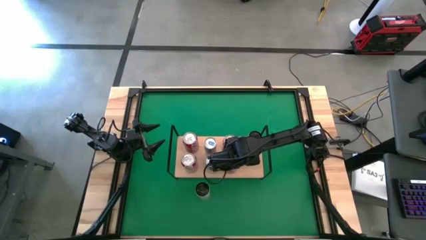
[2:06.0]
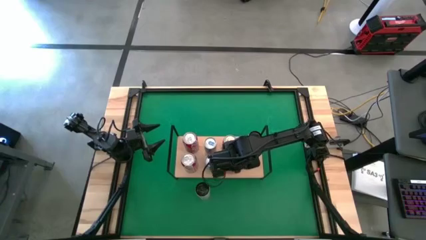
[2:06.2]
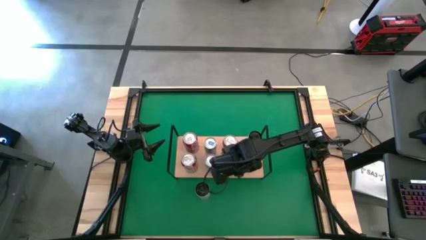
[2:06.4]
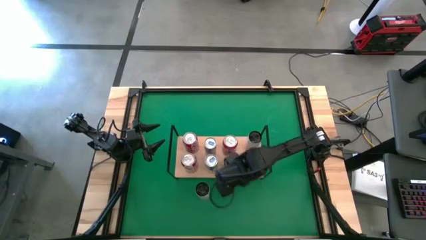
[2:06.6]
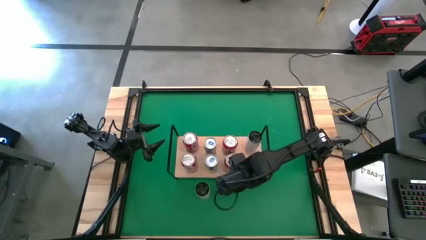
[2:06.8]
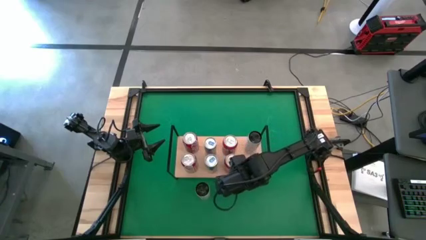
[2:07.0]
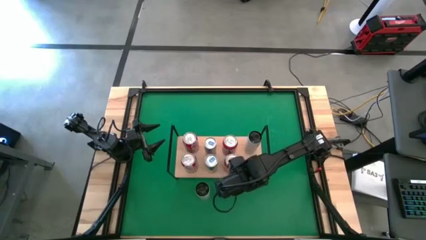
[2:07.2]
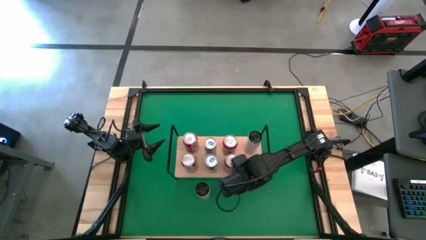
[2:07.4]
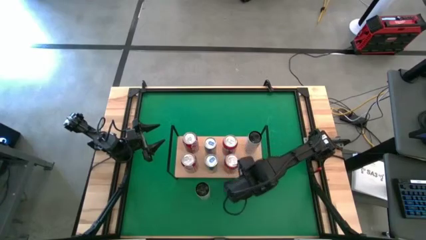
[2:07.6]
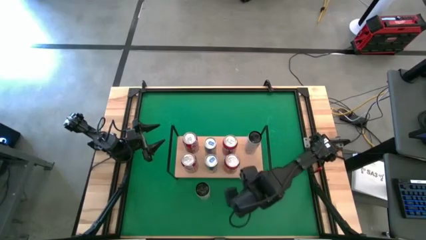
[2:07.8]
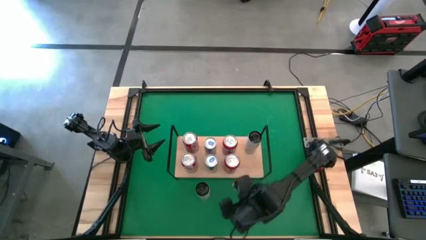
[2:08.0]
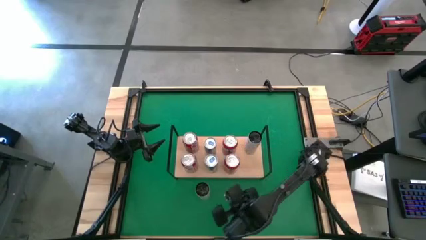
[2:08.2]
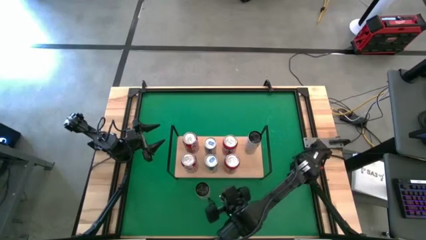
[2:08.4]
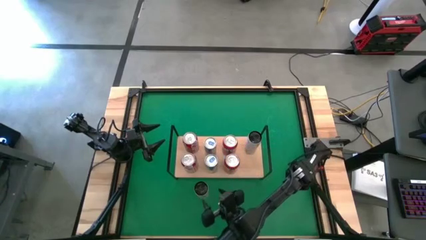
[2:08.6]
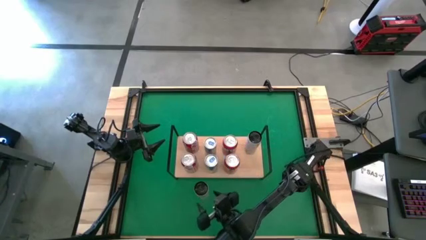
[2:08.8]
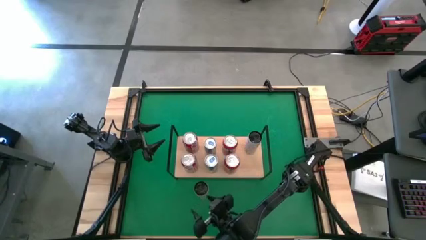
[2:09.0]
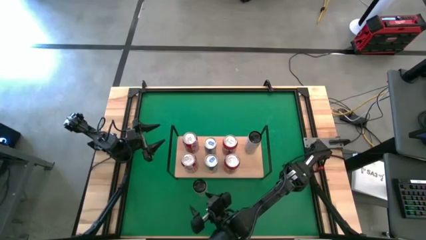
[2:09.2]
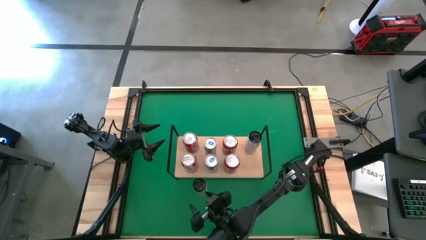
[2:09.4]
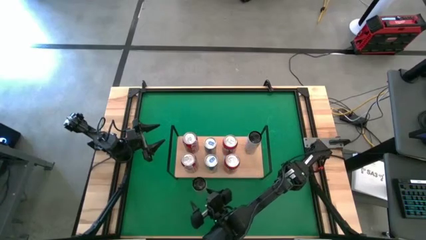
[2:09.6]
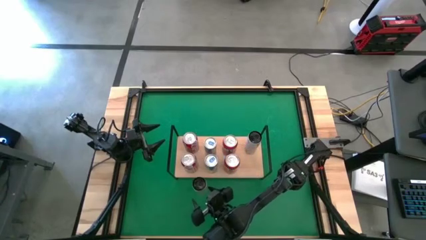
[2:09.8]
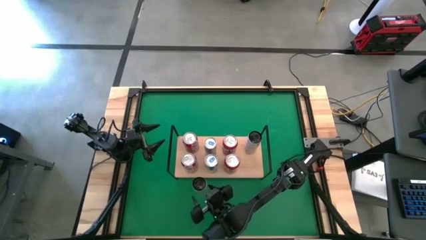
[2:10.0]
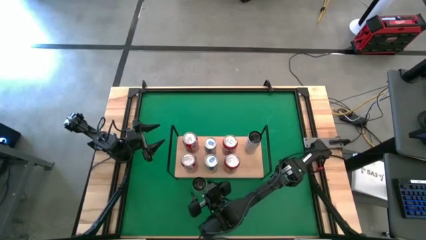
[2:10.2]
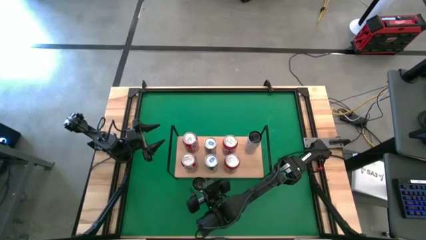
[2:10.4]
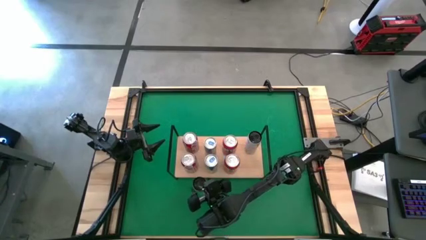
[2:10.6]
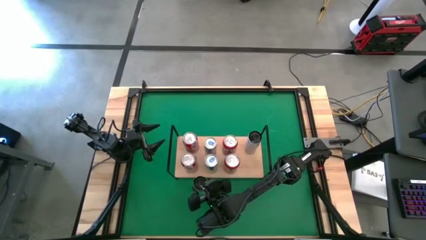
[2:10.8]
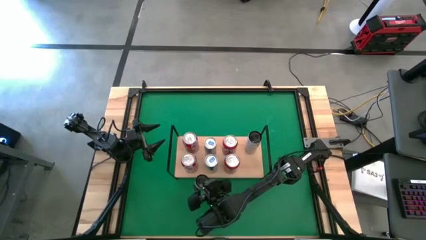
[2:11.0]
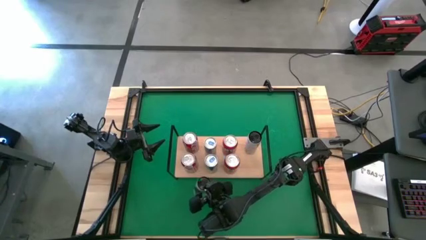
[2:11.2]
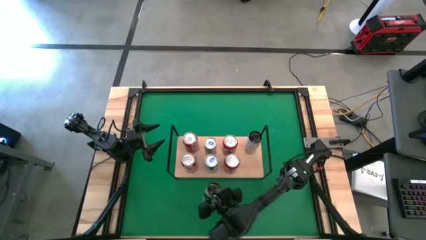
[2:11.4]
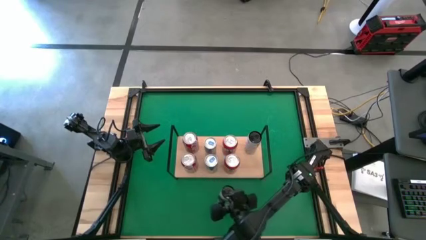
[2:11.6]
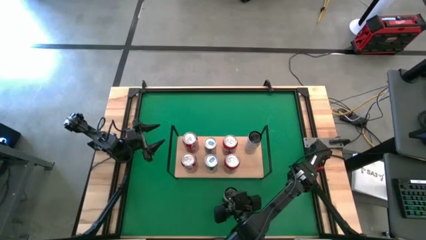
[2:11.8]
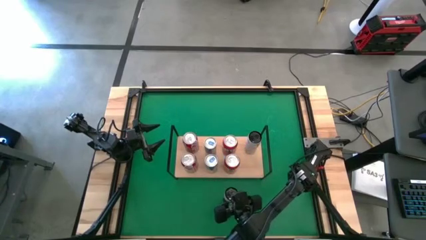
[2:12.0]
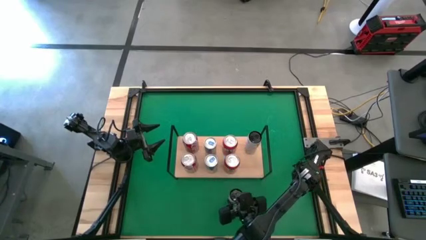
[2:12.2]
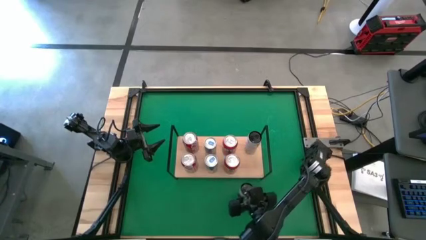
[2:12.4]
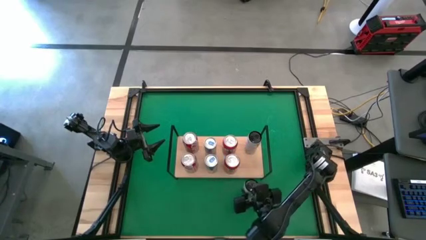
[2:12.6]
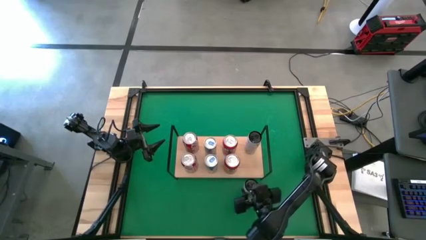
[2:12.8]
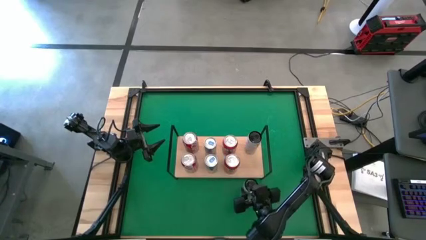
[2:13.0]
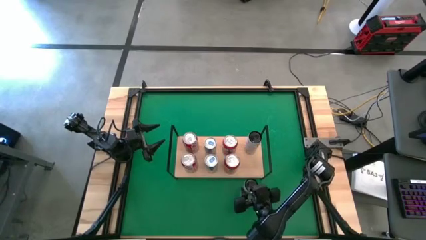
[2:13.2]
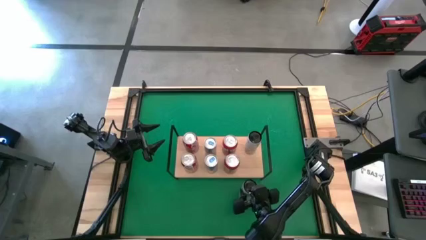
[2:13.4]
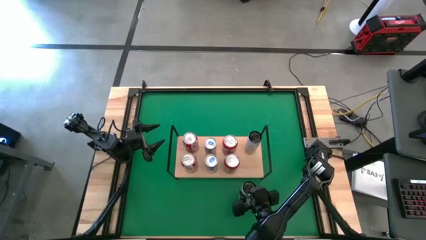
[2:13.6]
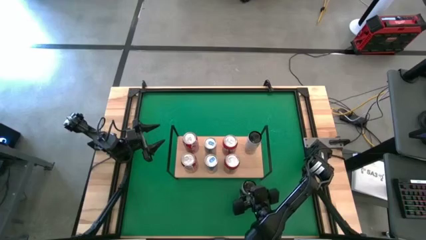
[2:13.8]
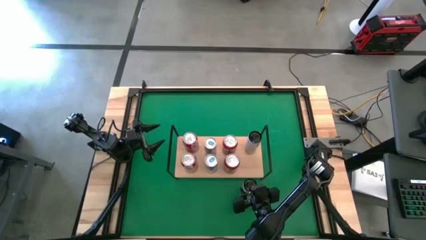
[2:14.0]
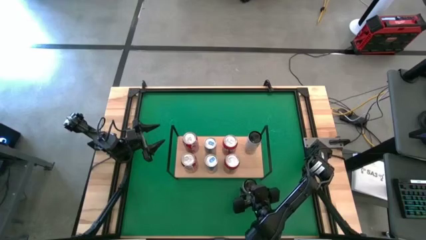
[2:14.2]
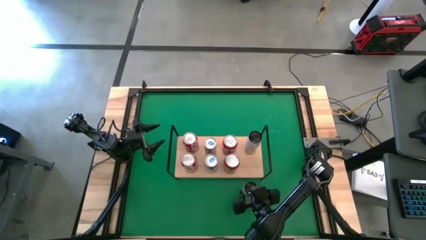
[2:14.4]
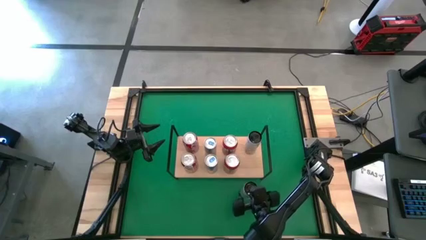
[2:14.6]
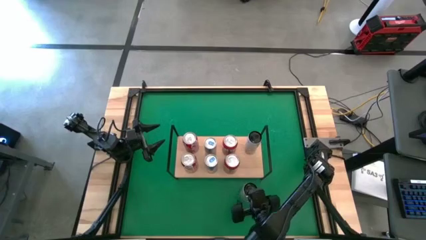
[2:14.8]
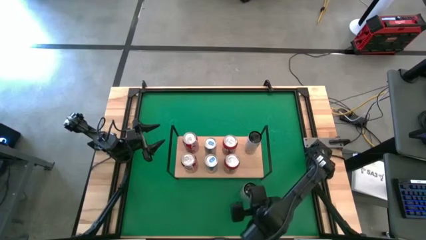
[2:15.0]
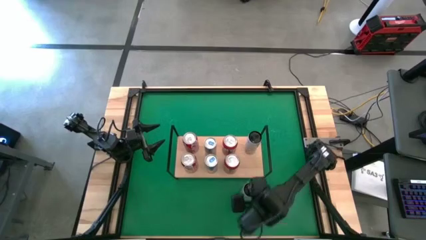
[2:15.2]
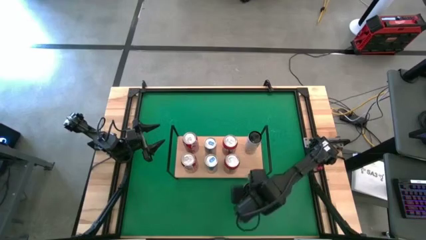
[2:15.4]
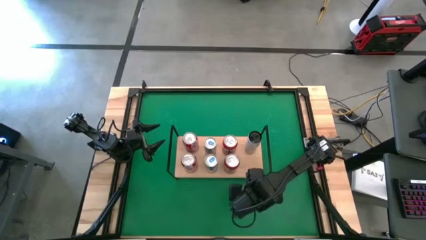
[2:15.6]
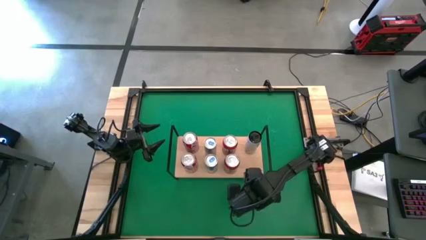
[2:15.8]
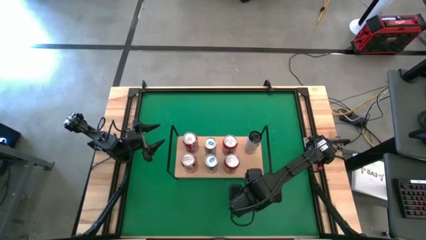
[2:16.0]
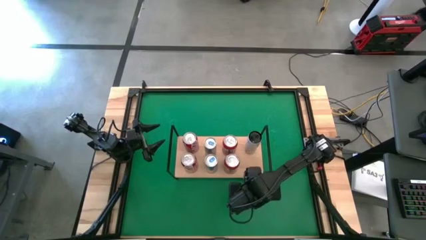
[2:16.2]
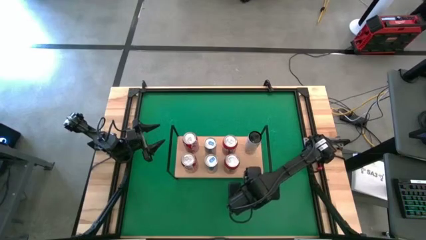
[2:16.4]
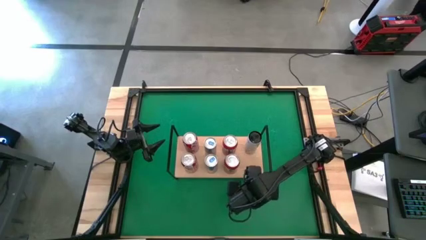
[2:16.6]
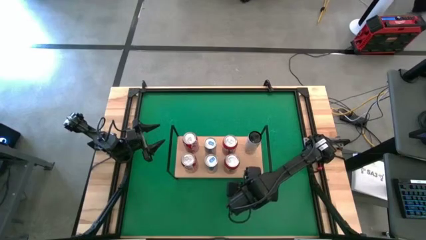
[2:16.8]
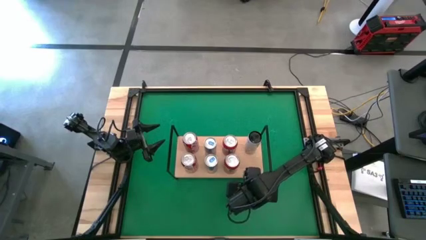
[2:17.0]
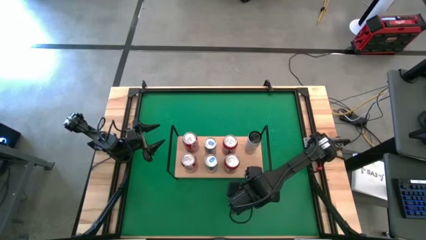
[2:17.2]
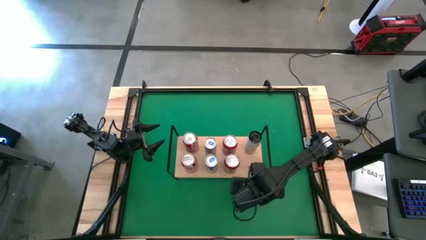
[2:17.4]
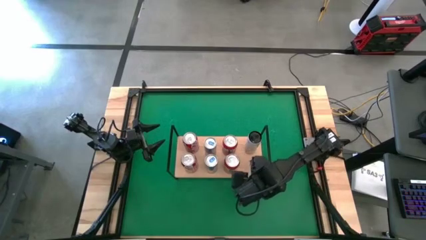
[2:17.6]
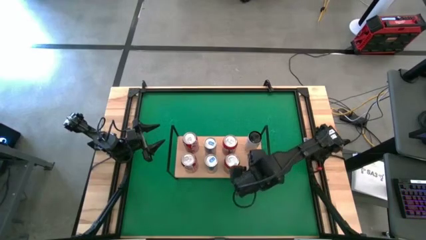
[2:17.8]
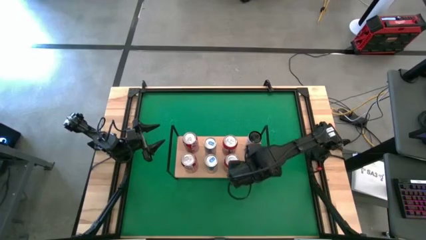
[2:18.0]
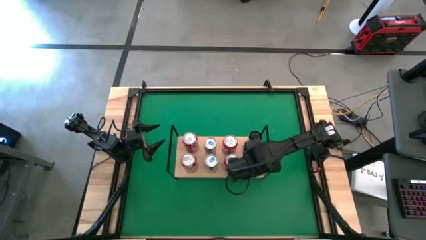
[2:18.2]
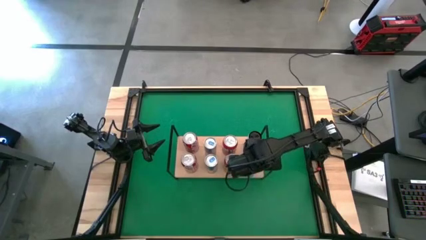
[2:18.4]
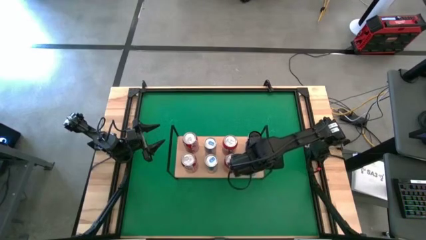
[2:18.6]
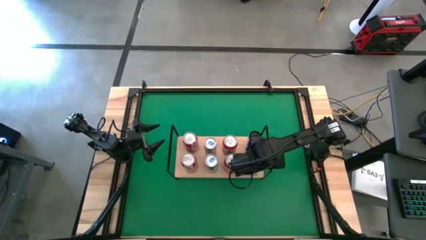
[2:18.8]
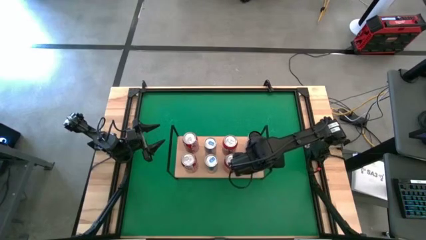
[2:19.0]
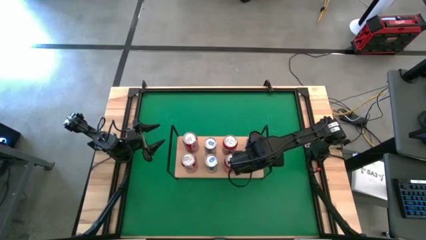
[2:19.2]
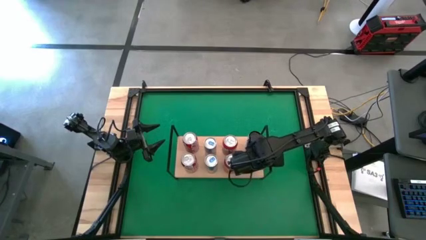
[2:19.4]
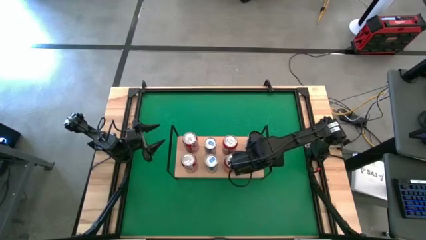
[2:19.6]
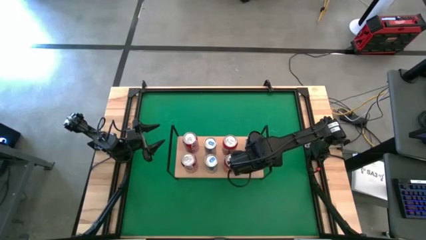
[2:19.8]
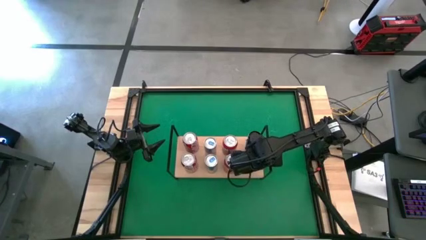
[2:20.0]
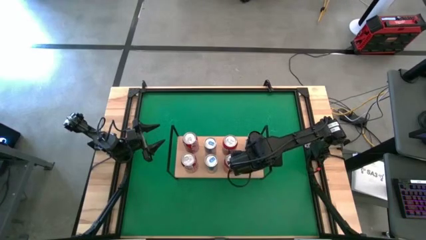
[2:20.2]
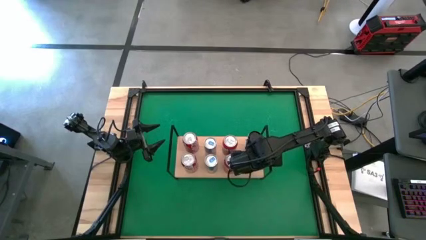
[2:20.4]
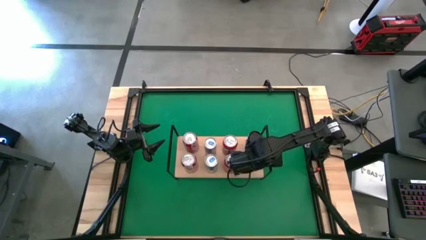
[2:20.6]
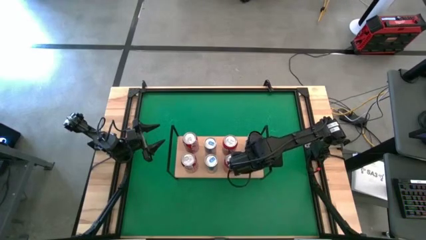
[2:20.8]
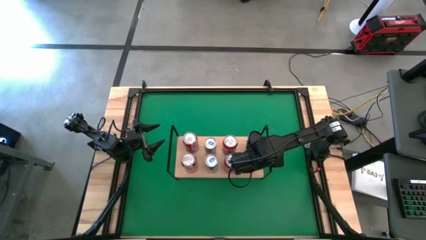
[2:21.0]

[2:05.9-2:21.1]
Task: Place canned beverage on shelf
Put the white soda can on the shelf

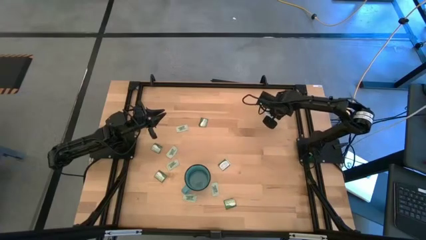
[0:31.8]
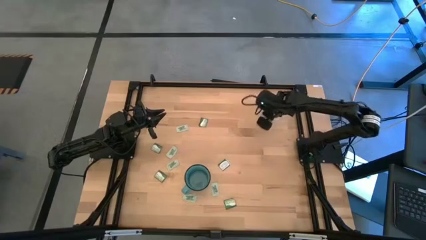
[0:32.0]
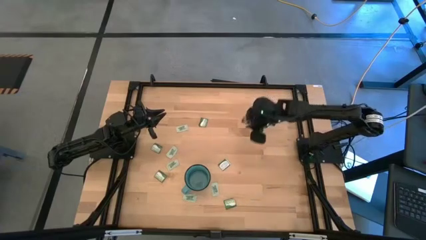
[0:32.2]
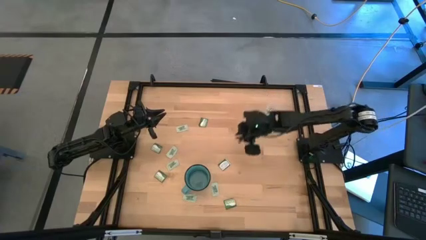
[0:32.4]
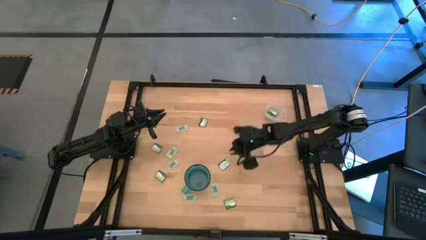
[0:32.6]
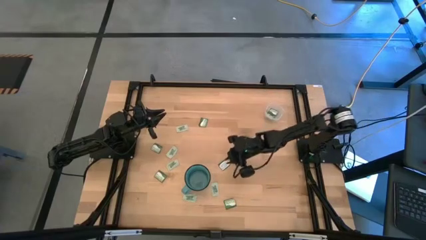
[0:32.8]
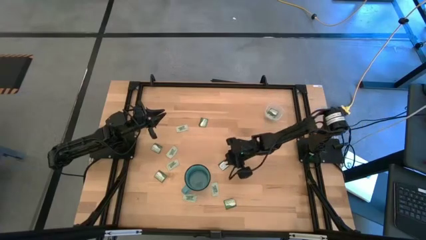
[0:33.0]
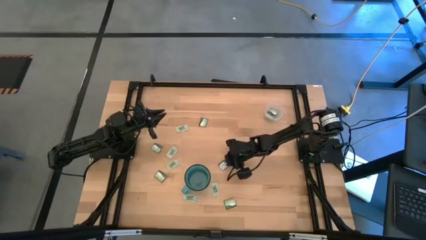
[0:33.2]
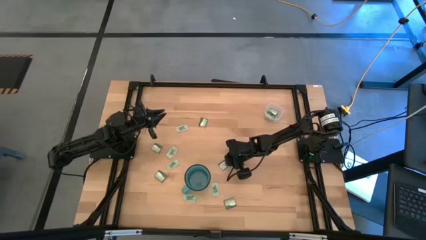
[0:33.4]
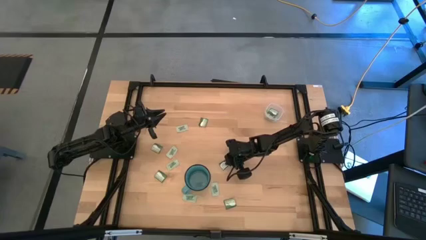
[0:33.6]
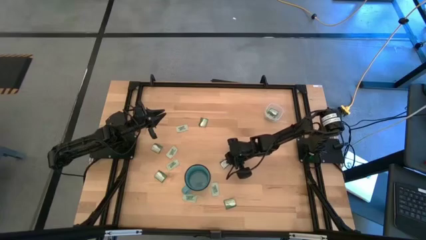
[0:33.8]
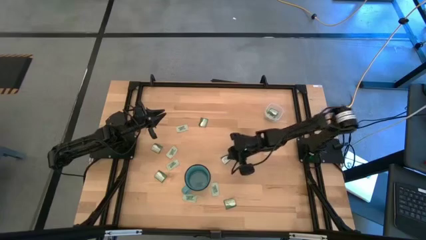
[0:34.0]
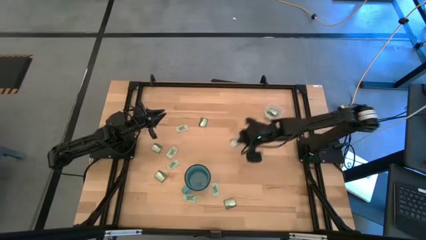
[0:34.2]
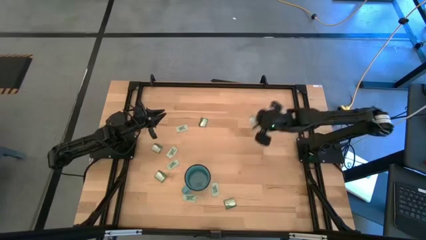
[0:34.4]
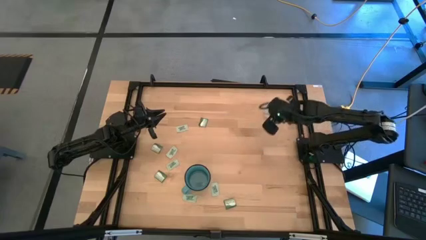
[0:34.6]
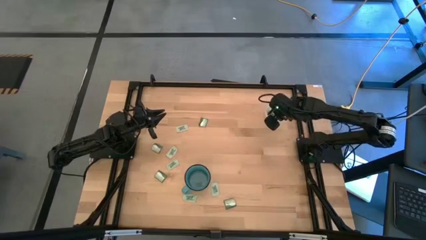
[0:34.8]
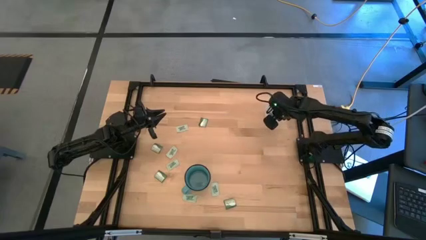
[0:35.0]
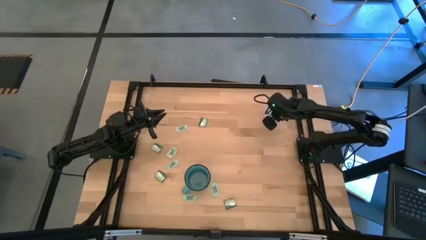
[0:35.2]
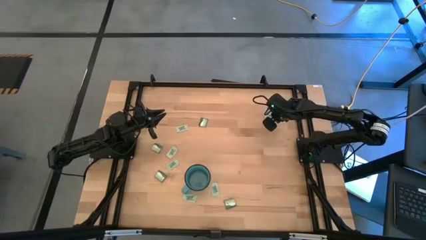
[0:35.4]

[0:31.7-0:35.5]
Task: Pick and place items into bin
Put the truvia packet into the transparent bin
